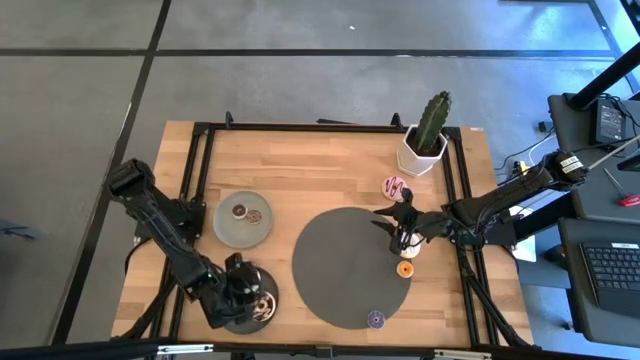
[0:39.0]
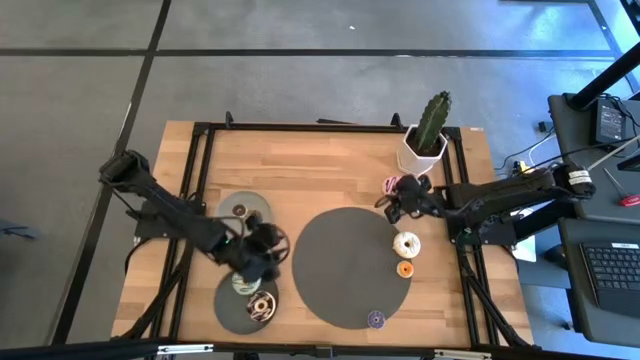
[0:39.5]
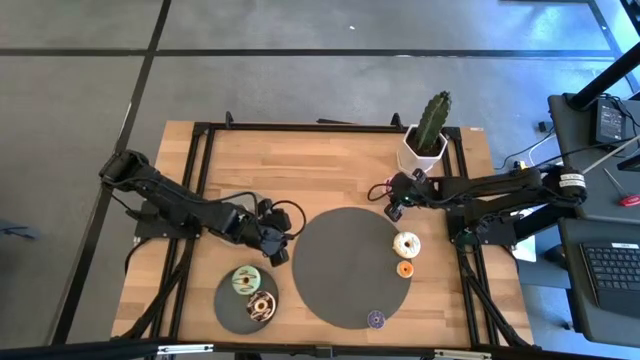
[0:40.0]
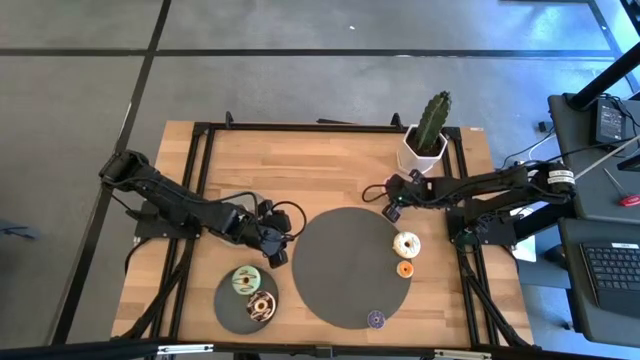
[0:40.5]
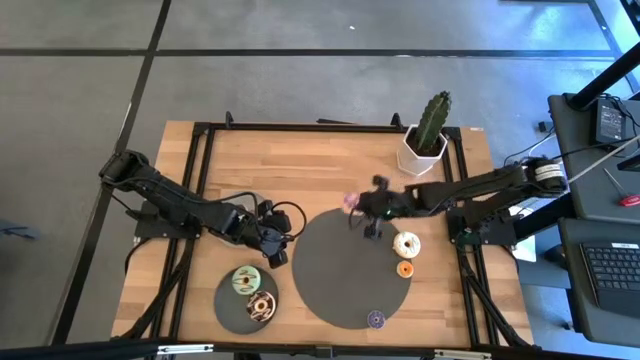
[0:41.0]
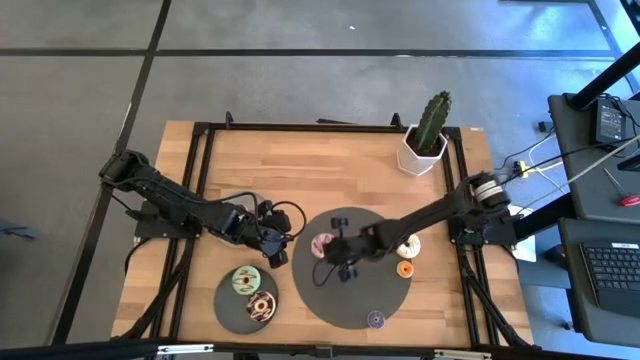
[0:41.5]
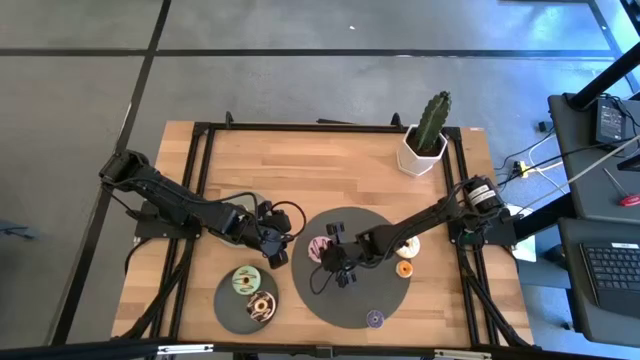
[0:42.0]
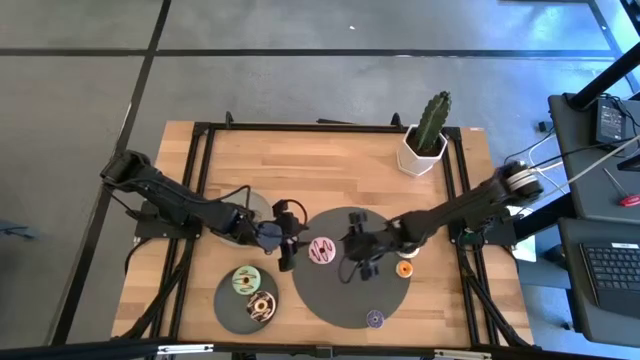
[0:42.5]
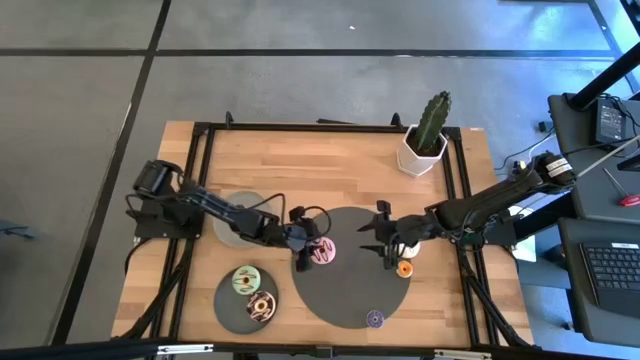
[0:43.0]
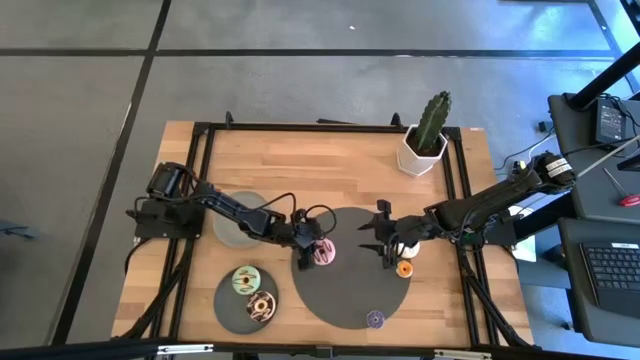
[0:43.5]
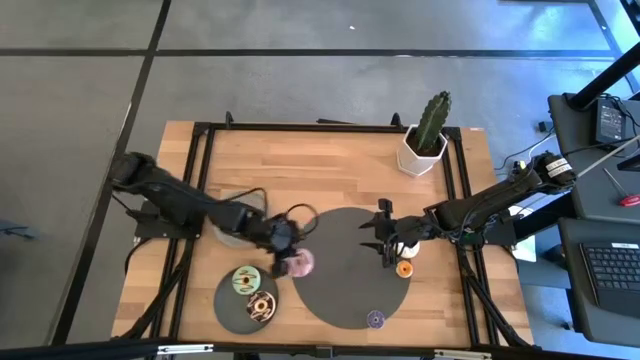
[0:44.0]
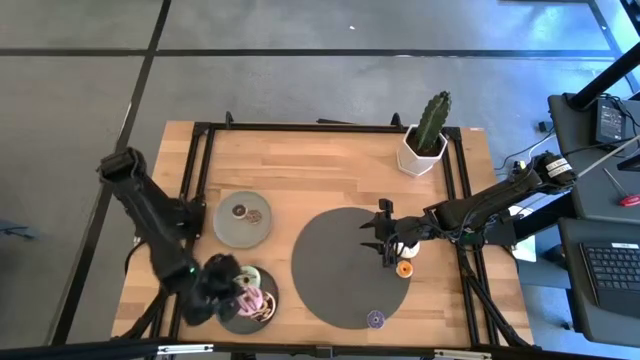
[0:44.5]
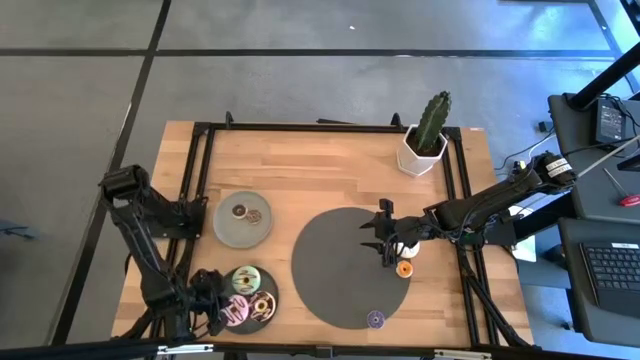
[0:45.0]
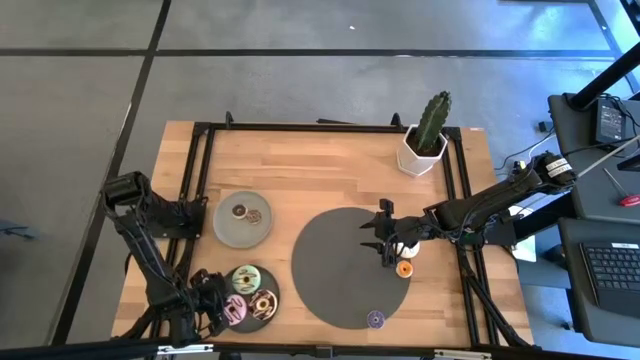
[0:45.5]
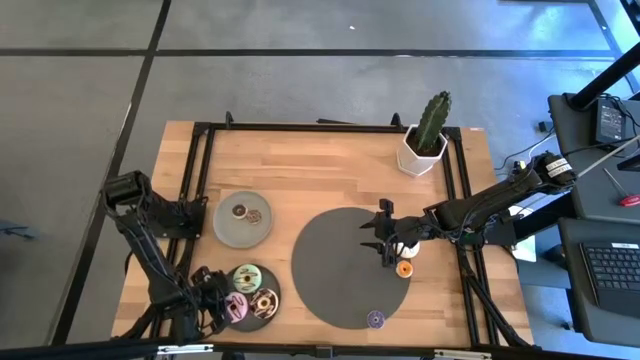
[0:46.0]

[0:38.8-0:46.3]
Task: Pick & Place donuts
Put the large purple donut on the black plate

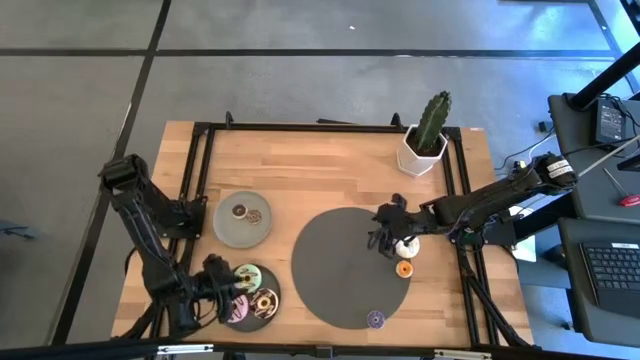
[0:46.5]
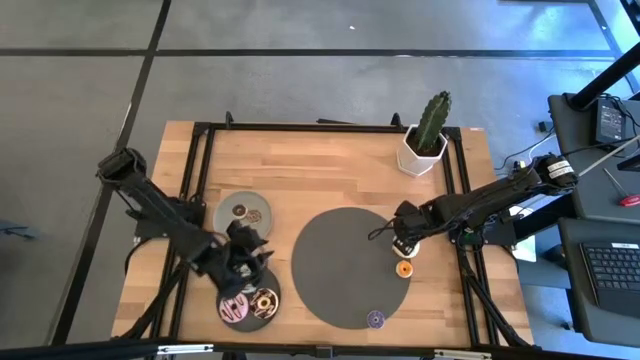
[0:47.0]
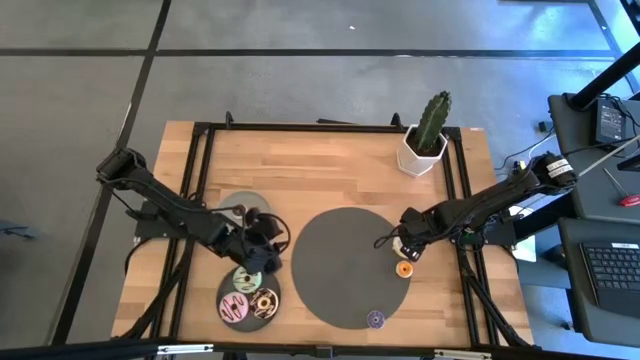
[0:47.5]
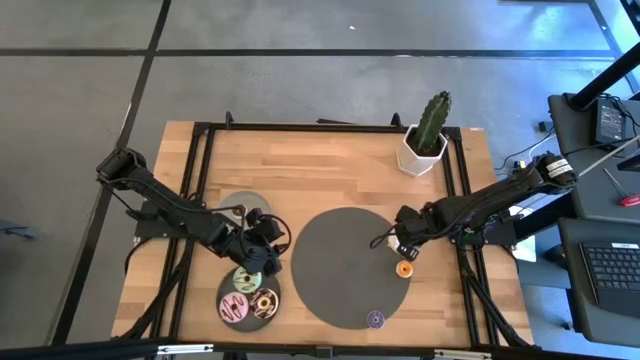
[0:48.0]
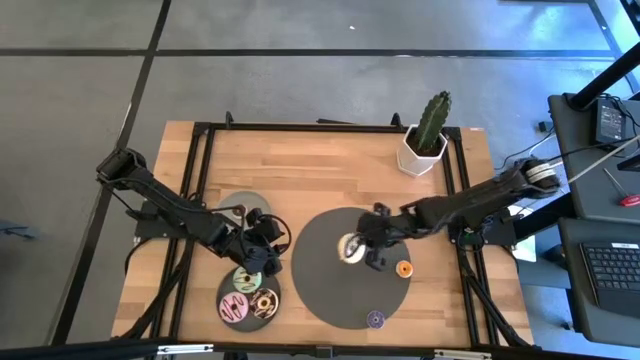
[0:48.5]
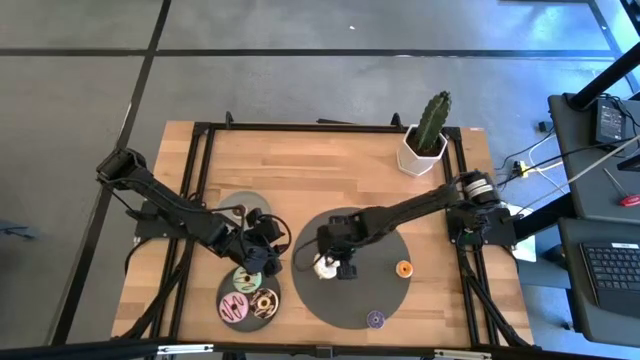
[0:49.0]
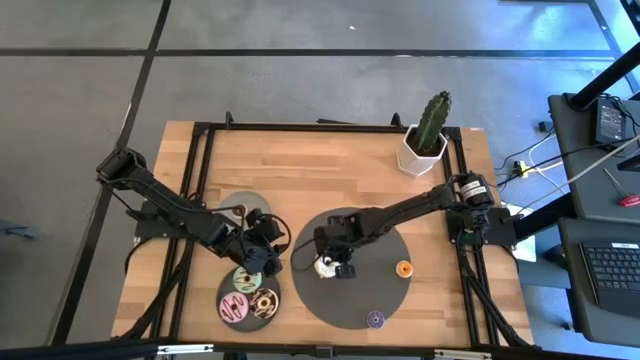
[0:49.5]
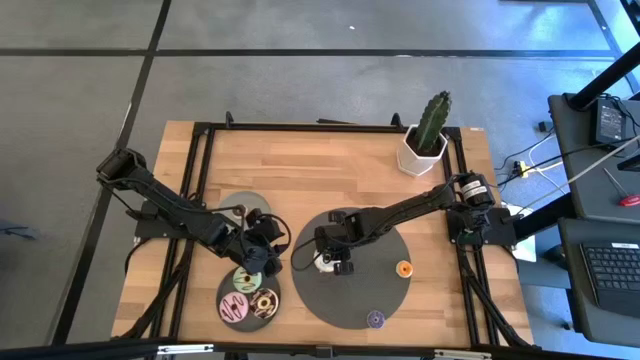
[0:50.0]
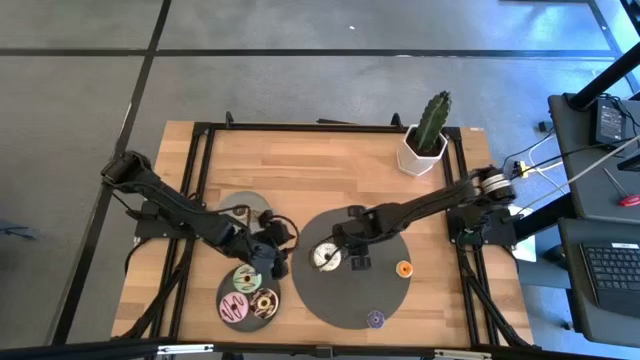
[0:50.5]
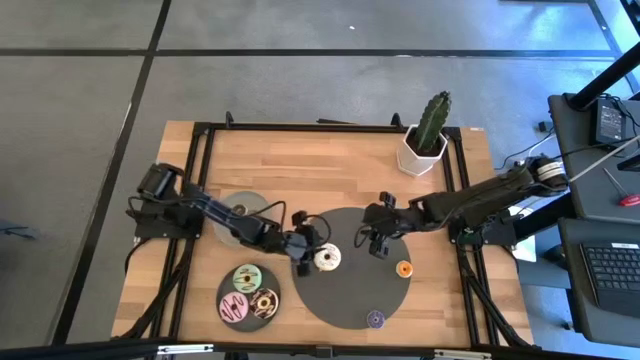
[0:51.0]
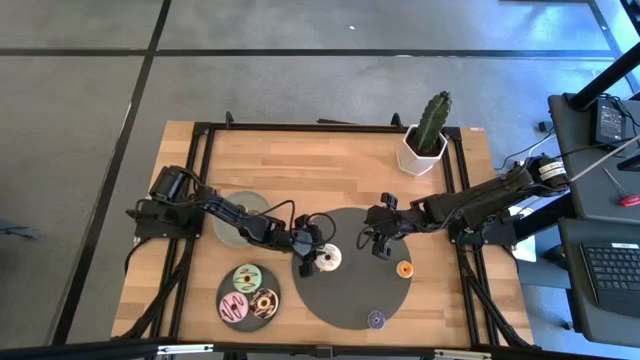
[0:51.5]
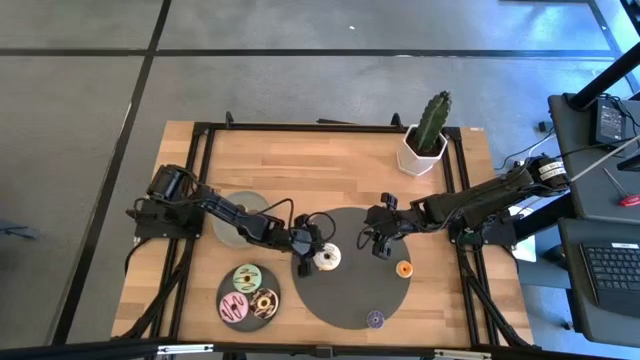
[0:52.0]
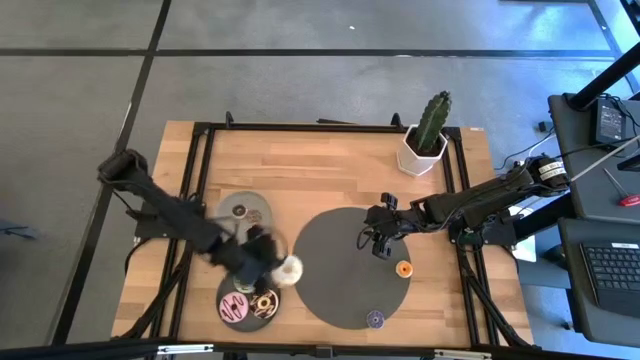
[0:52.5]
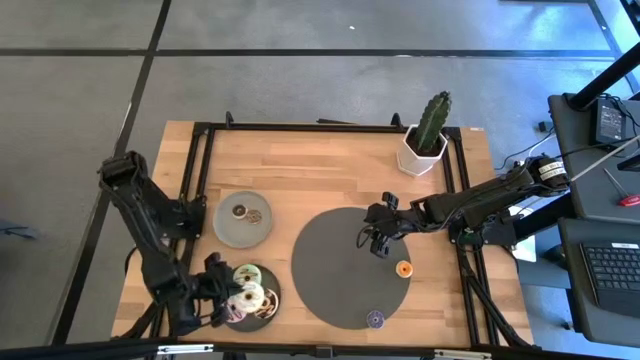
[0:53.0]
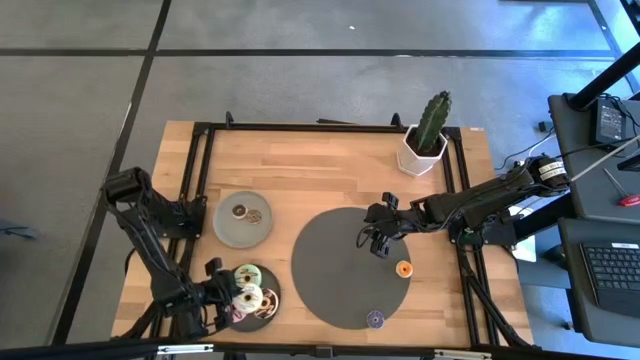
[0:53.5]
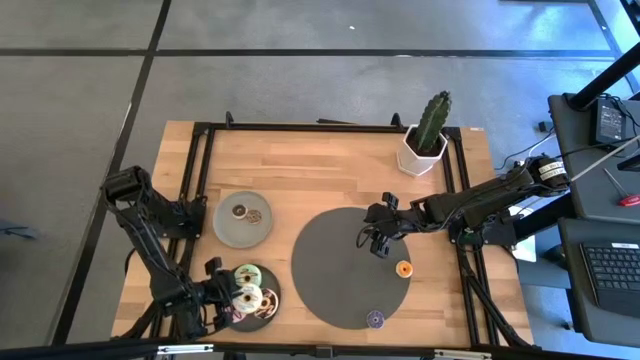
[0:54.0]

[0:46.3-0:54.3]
Put the large white donut on the black plate

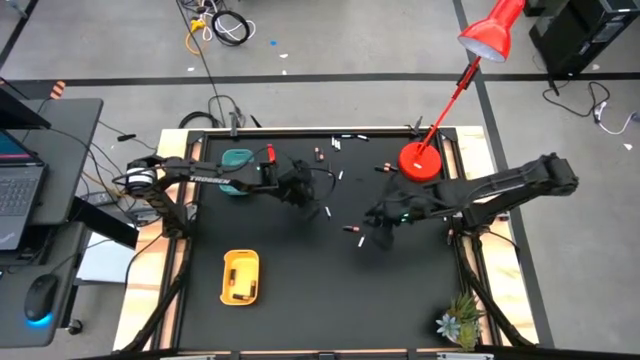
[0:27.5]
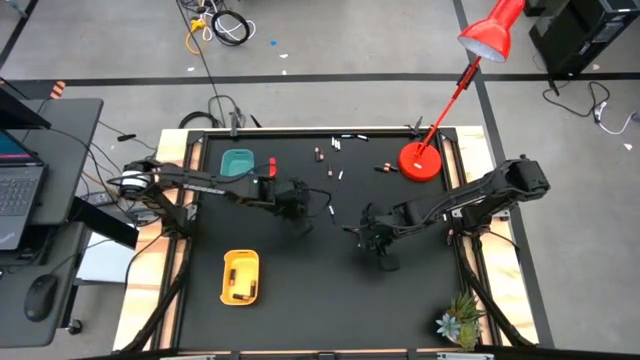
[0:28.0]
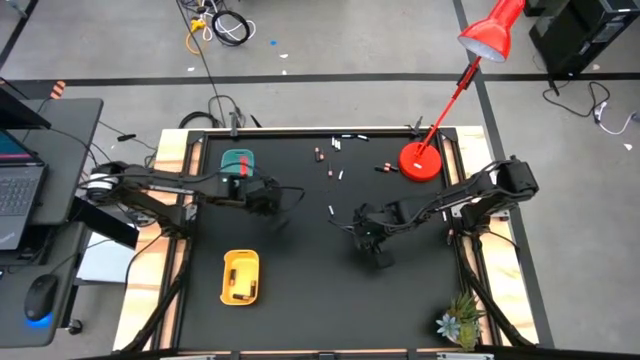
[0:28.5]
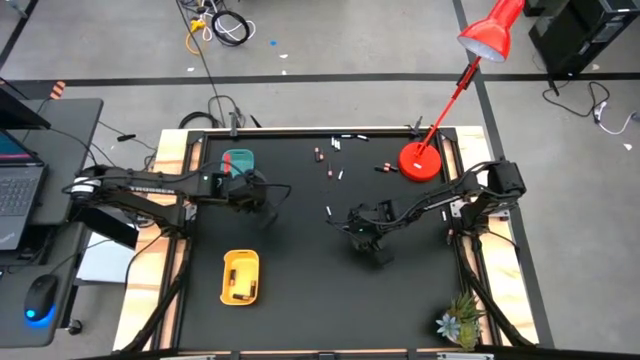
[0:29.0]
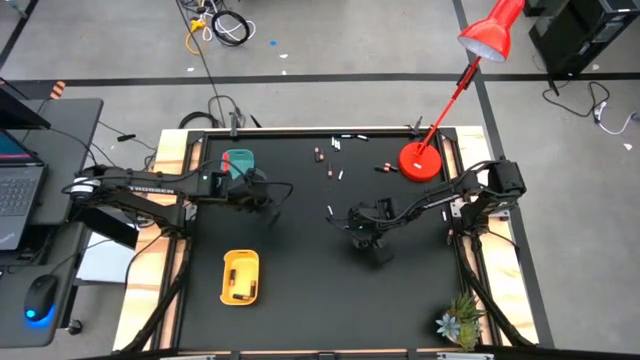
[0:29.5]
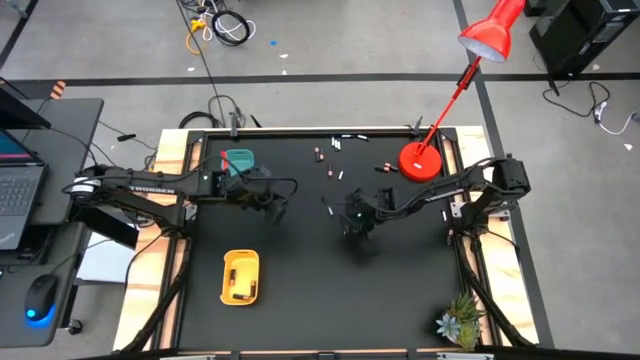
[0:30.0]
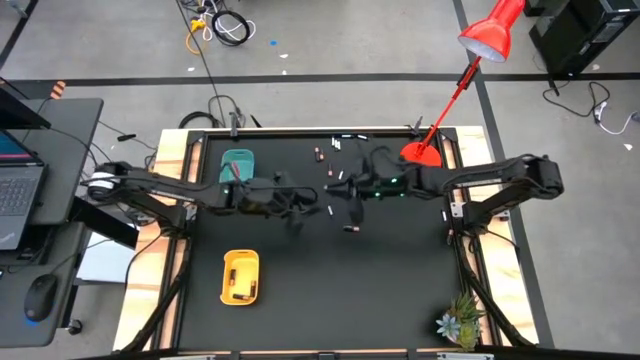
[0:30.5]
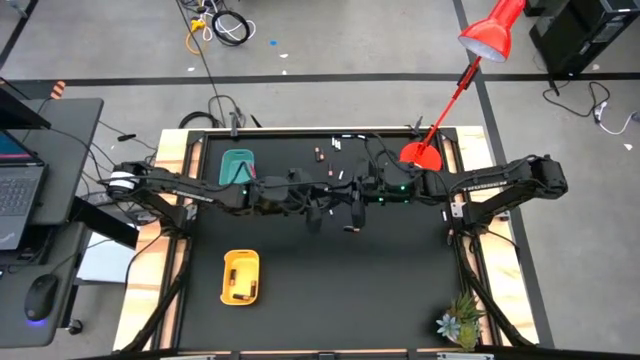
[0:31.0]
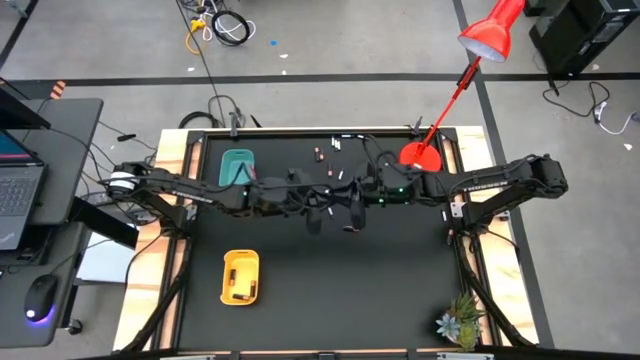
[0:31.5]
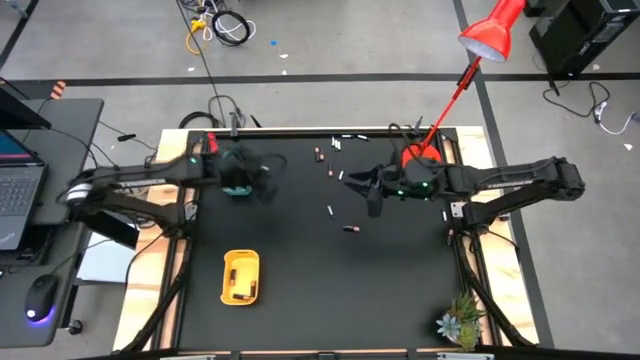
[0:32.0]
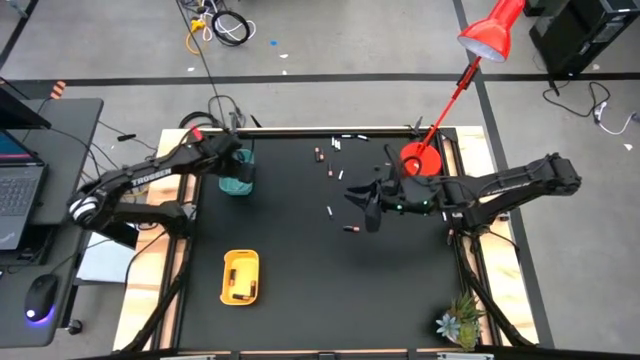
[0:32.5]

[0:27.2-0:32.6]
Task: Sort batteries
Put the white battery into the blue bin
